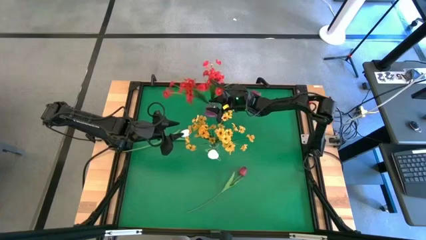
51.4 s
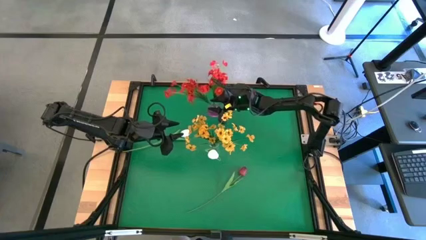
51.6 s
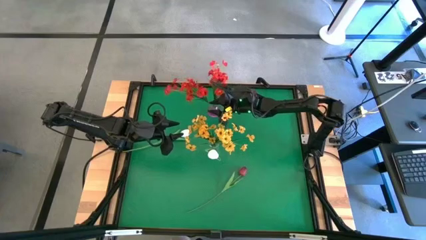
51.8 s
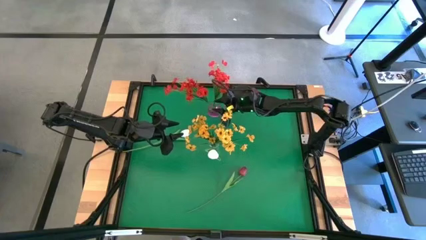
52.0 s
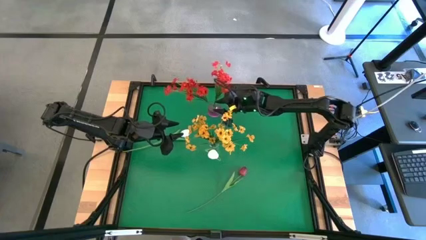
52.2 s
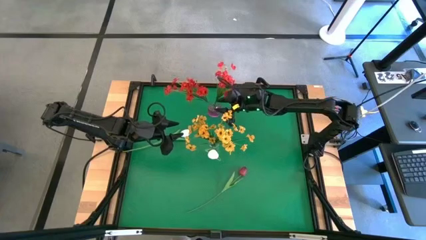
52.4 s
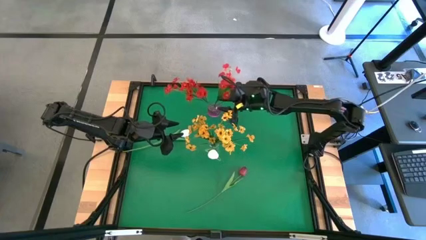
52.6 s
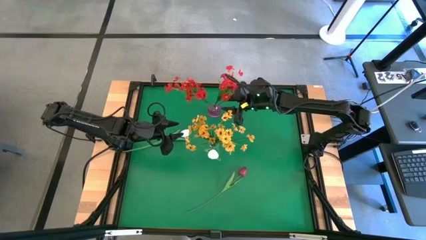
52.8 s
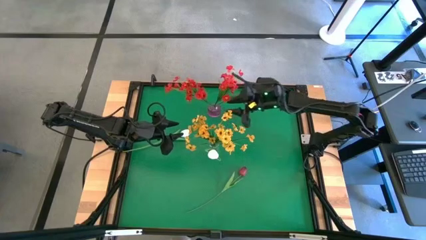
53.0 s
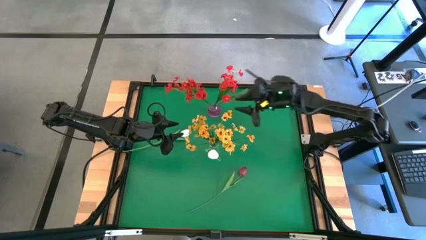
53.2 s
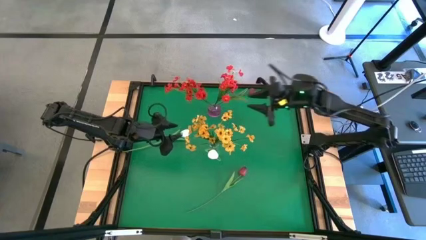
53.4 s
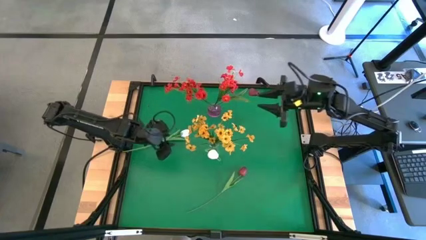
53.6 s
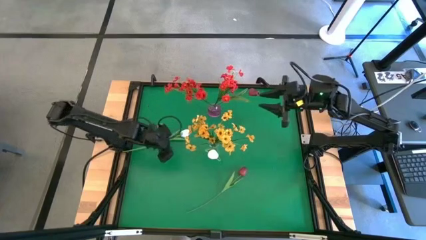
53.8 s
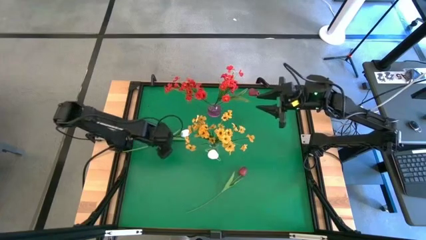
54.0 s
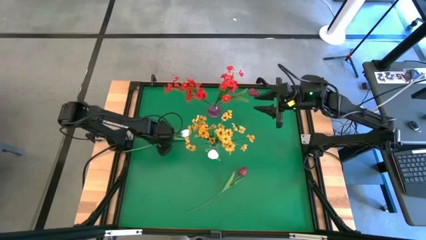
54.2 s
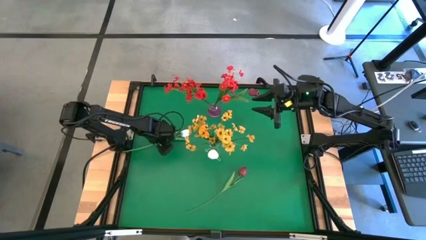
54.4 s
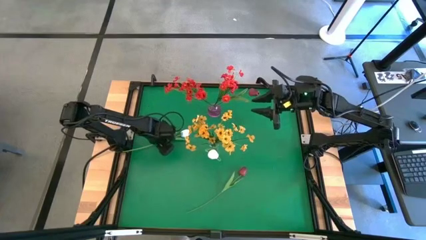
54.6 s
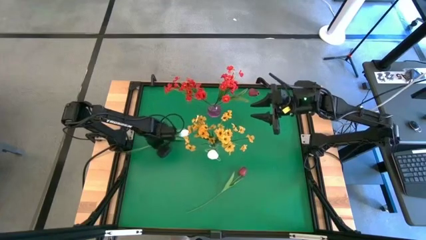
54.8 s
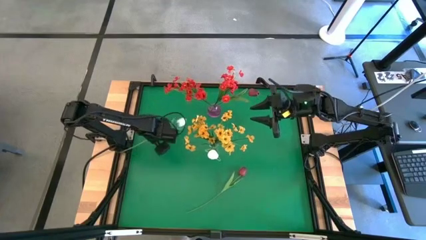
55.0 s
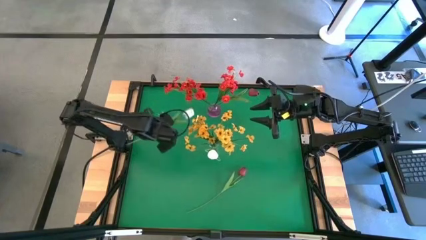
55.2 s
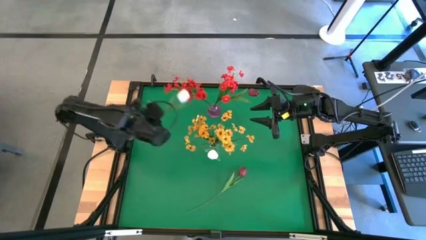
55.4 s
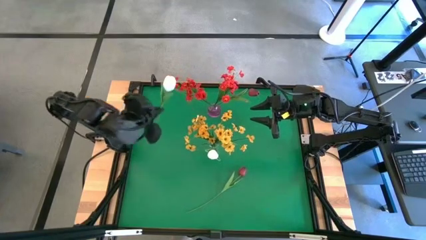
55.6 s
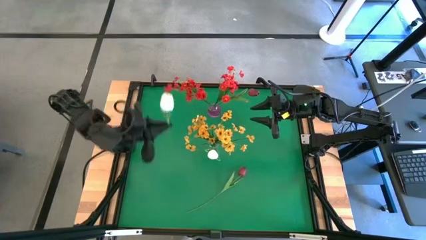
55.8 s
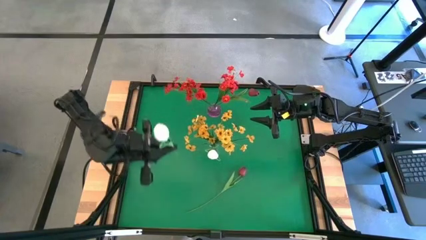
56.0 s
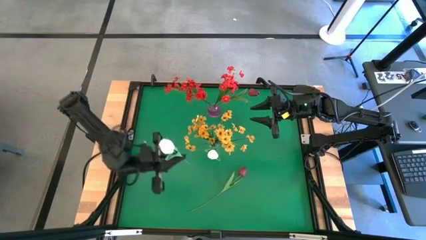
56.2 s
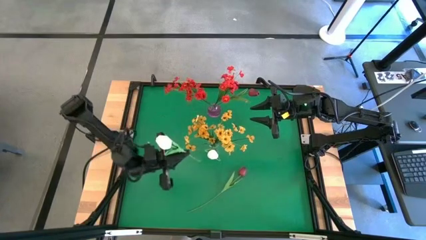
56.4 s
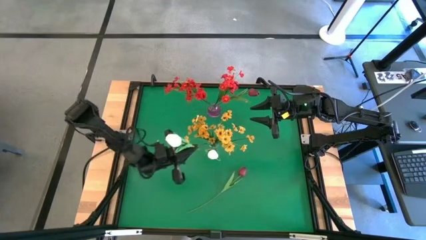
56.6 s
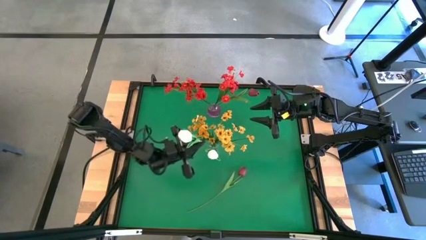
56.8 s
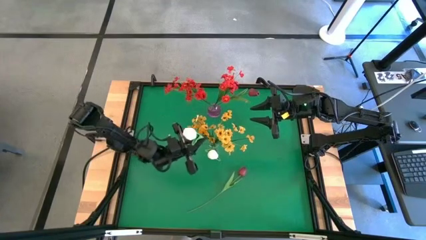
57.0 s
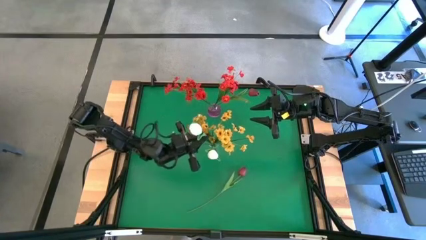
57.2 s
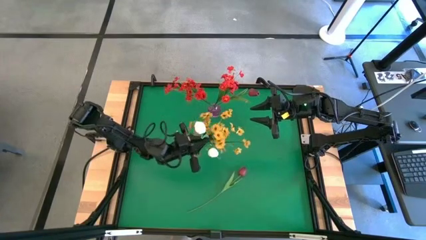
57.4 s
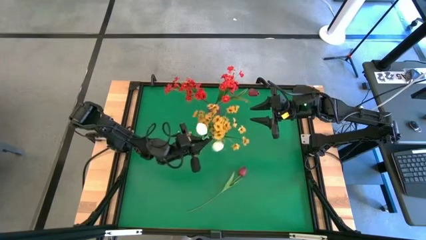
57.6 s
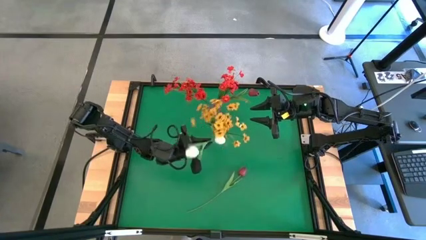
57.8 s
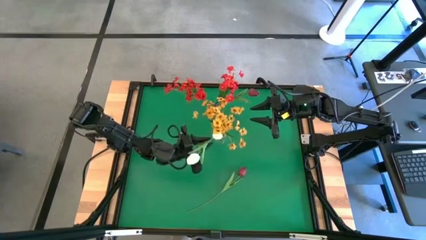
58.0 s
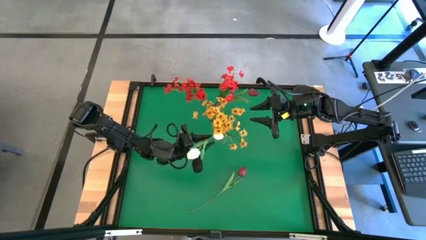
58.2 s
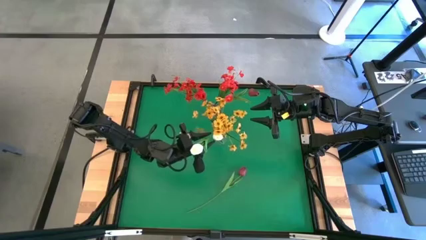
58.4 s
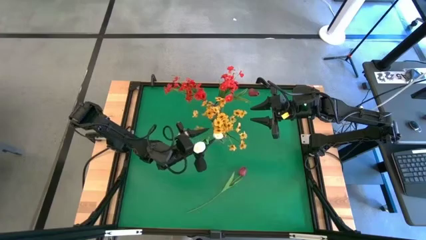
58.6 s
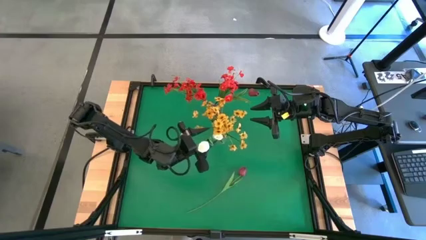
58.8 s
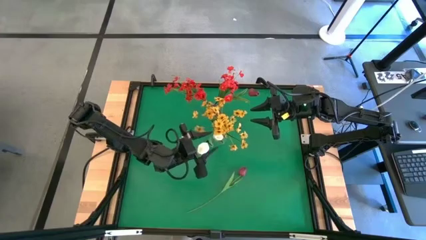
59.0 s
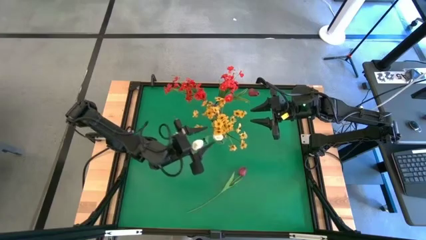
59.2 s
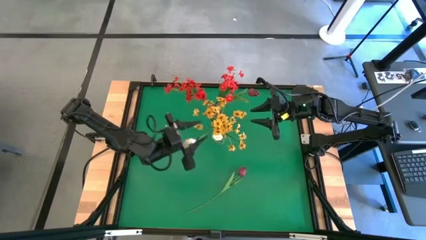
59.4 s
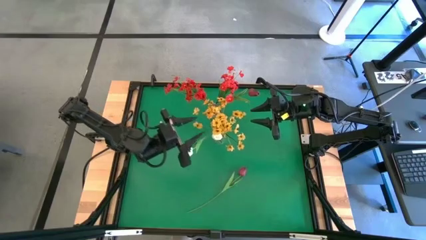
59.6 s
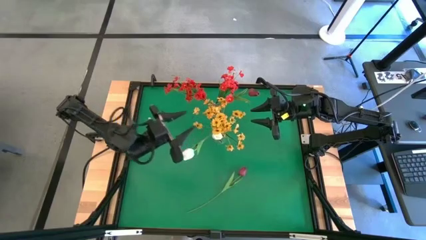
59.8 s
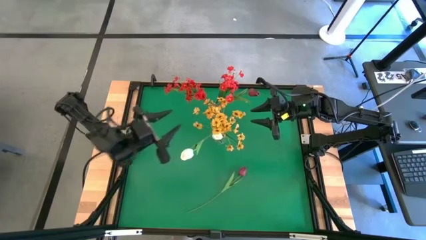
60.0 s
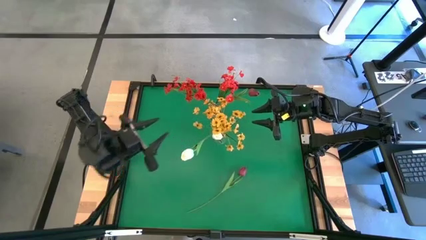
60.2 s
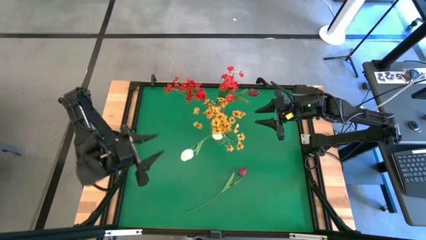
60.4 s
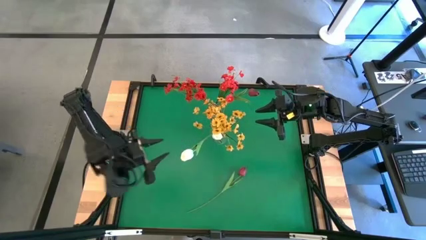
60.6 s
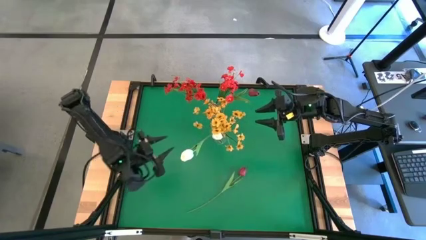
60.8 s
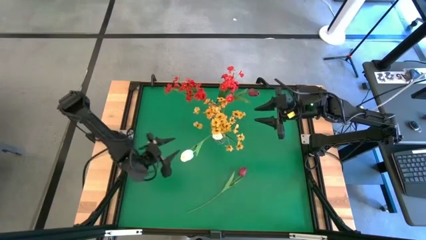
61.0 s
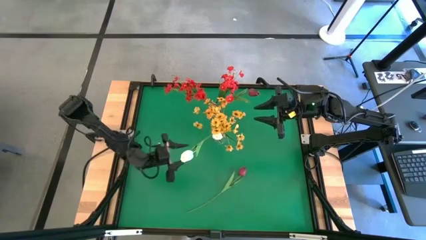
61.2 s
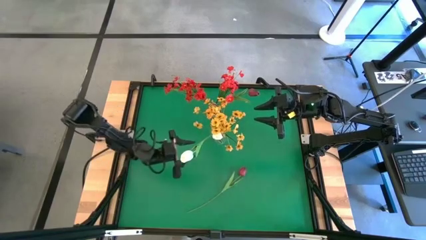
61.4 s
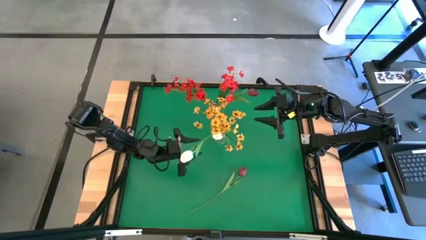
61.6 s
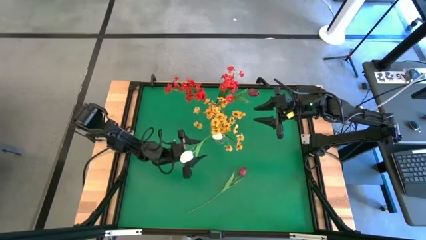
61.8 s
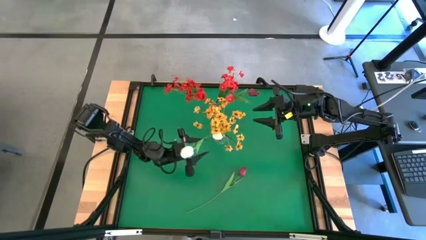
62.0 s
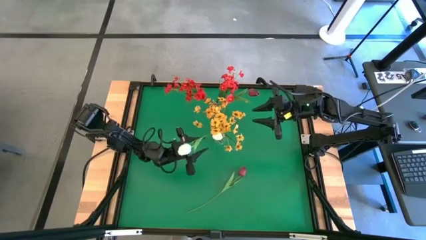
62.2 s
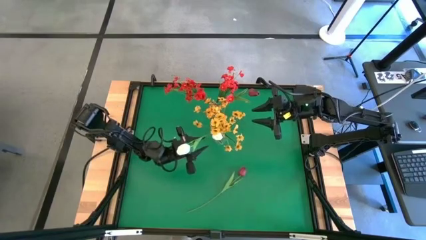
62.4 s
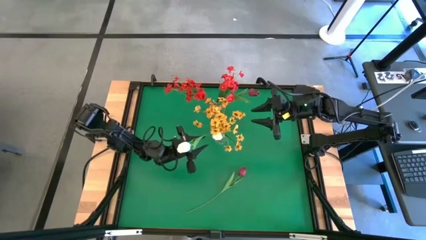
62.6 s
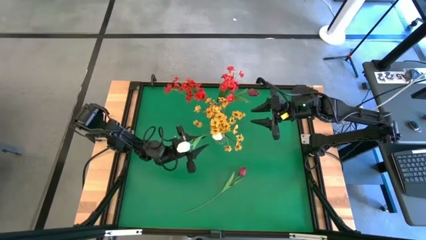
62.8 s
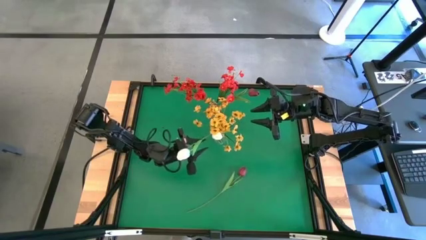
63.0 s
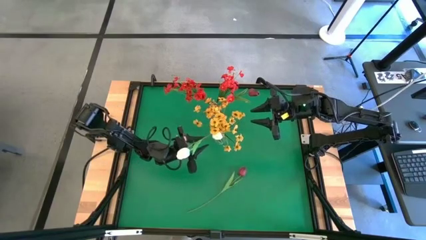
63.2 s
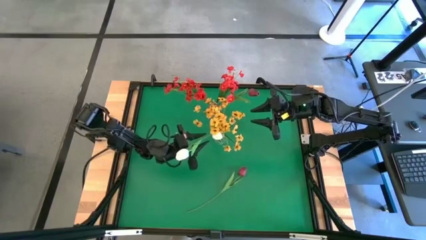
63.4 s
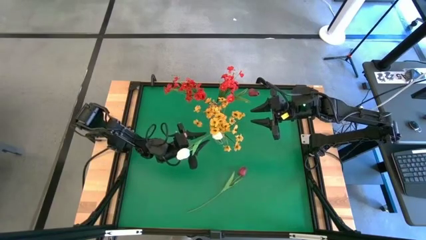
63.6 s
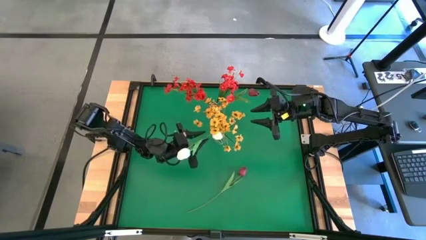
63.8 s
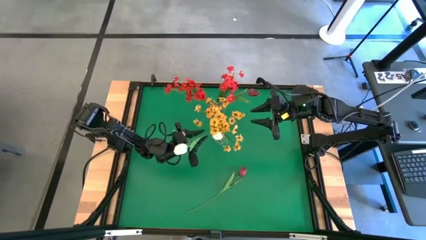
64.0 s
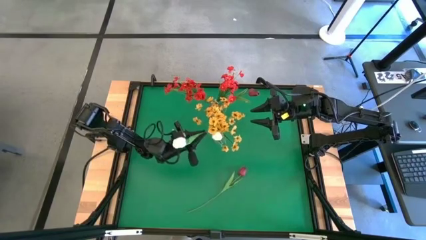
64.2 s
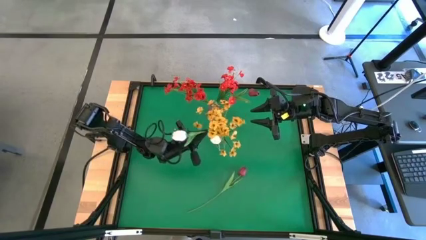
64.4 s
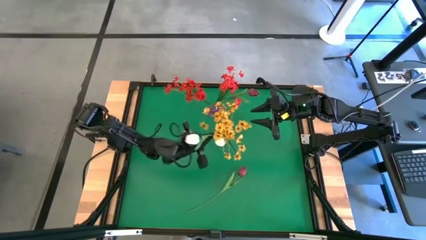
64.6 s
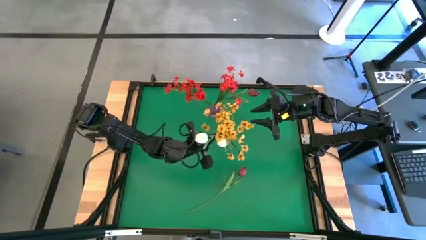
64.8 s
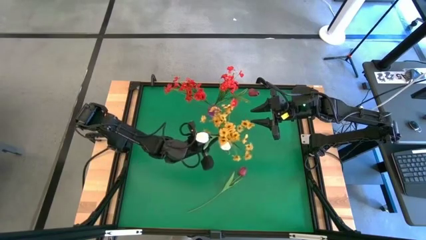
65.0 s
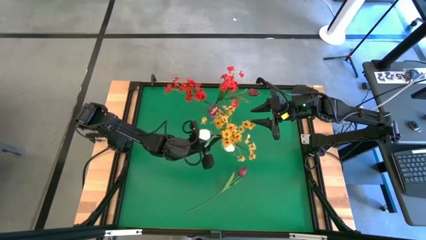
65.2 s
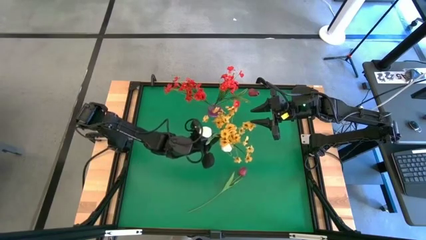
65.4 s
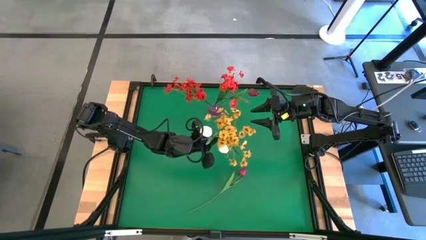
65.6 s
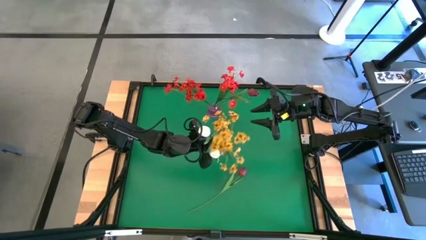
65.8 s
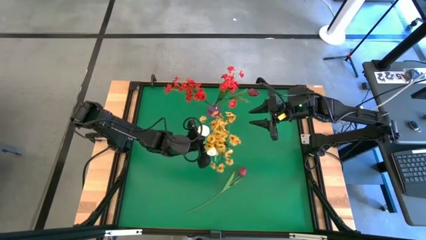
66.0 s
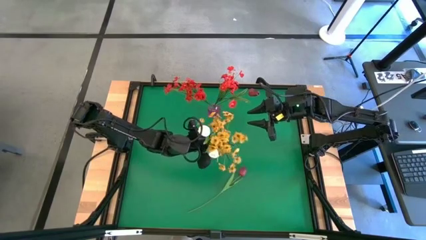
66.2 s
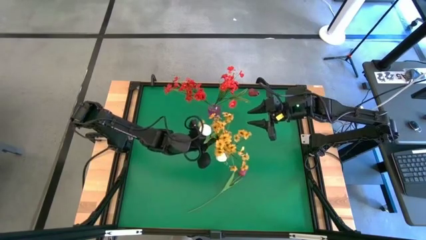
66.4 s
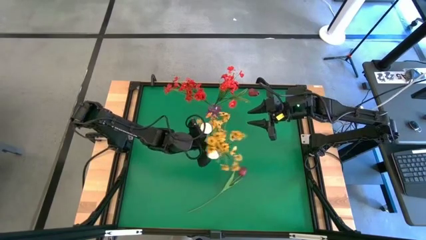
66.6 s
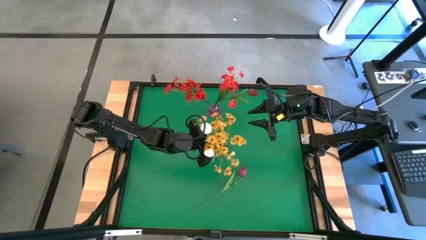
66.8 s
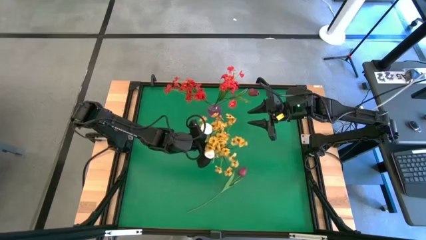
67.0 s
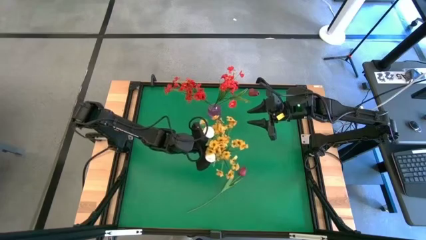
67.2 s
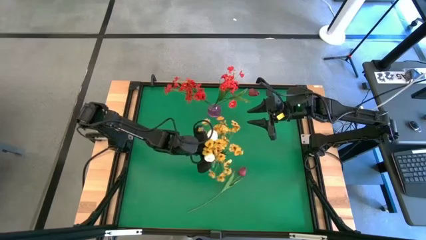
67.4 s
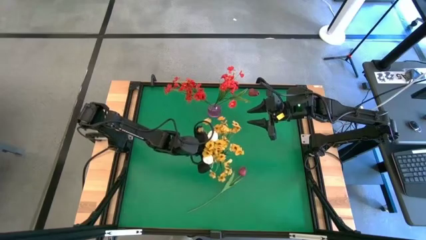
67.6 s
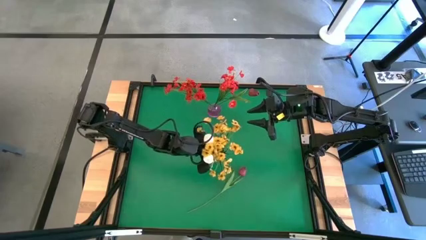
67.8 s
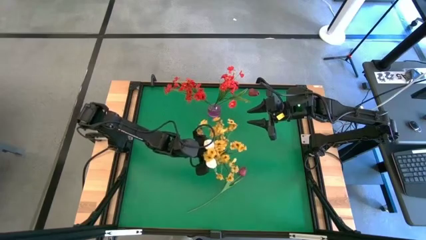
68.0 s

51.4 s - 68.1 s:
Task: Sort flowers into vase by color
Put the white tulip into the transparent vase

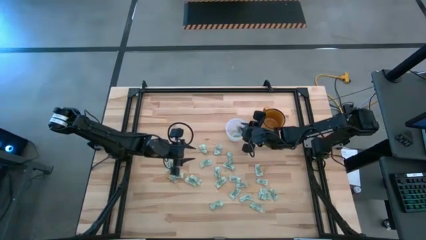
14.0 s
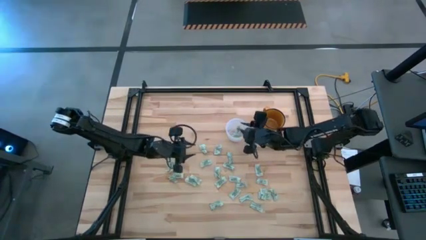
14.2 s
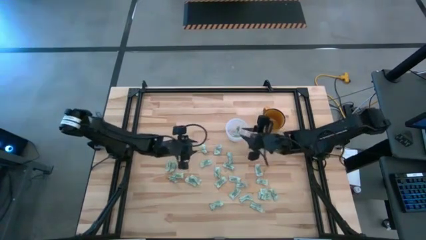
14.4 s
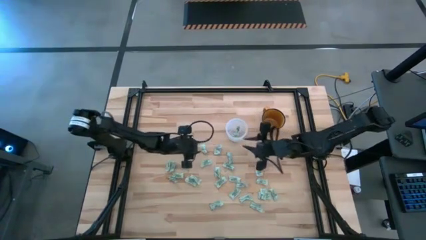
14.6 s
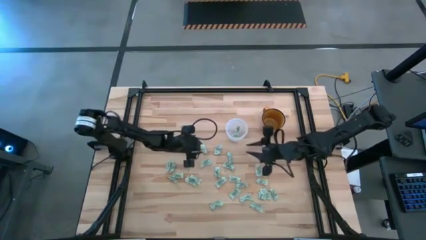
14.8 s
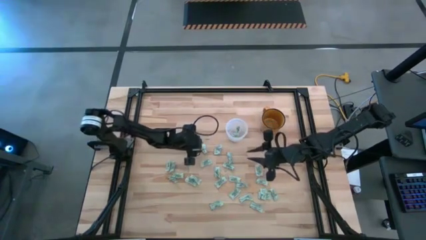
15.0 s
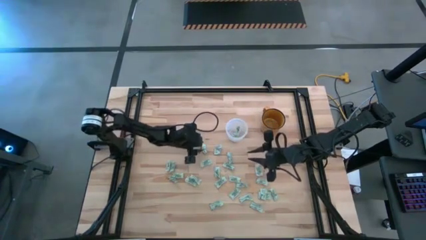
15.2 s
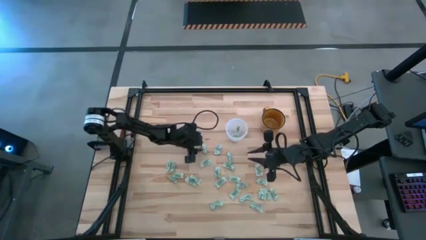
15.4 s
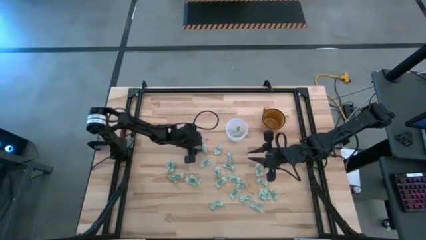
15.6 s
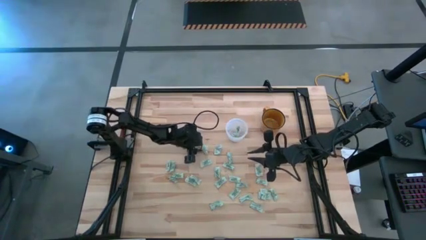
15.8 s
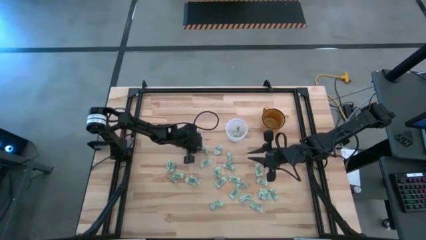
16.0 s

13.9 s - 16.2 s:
Task: Pick and place Stevia / Truvia into bins
Put the green stevia packet into the transparent bin
